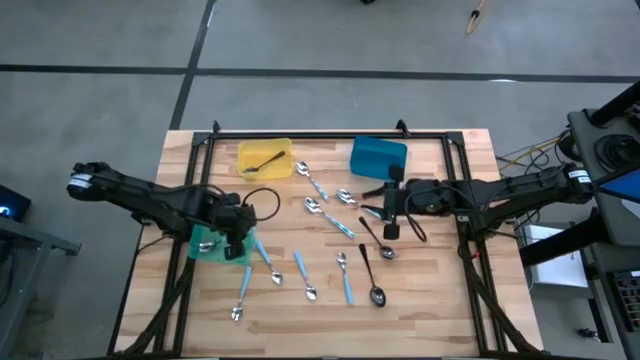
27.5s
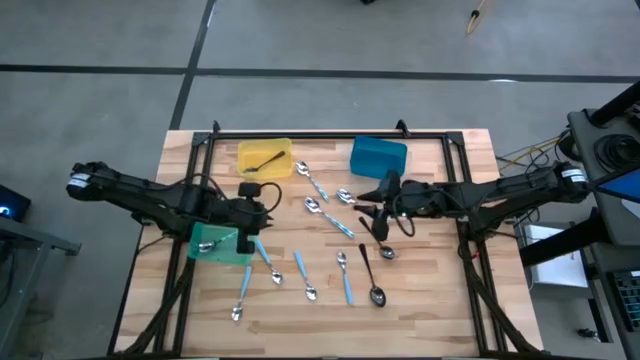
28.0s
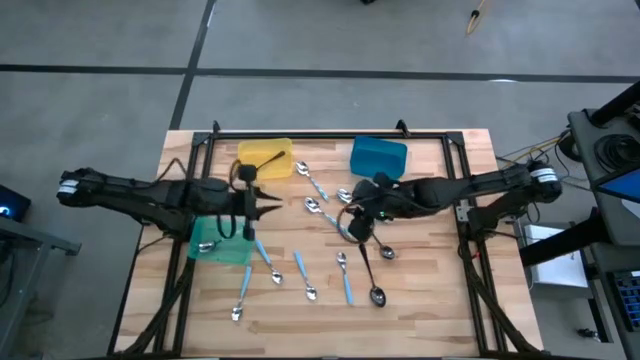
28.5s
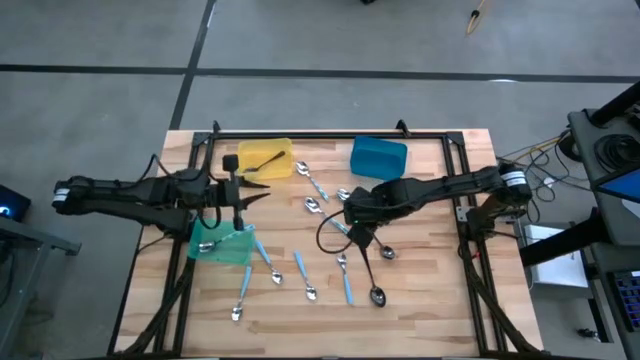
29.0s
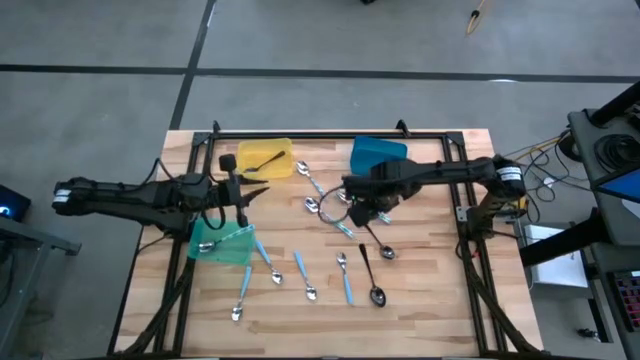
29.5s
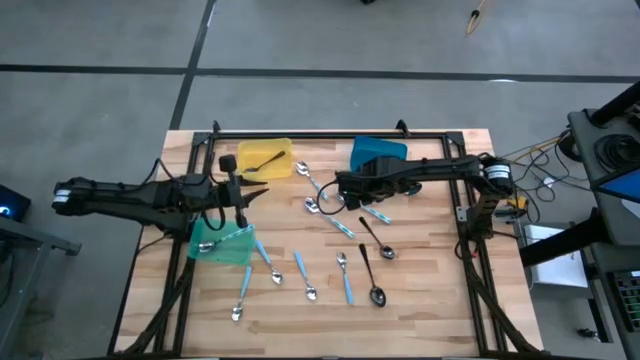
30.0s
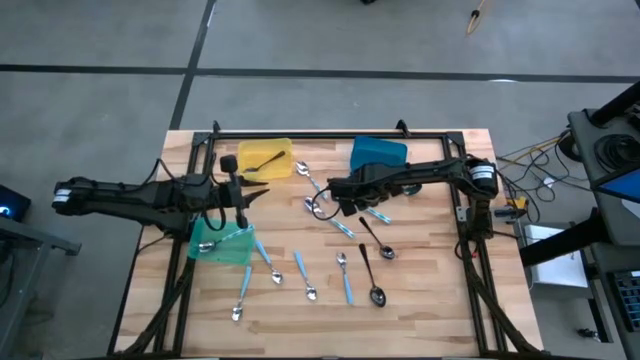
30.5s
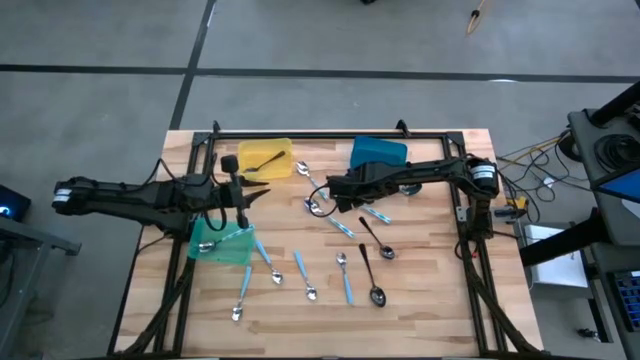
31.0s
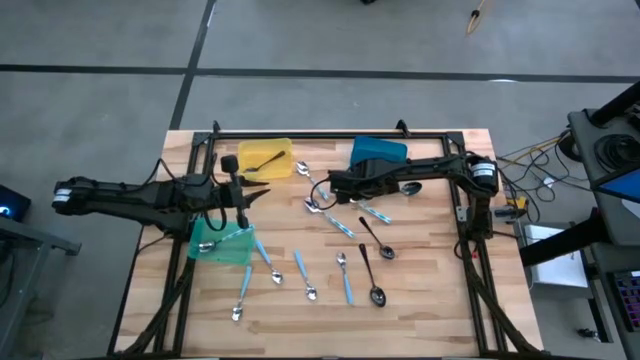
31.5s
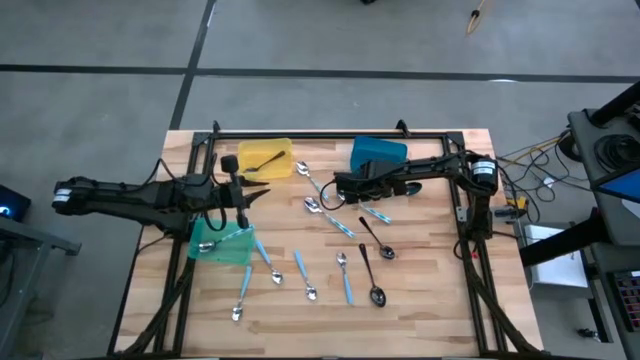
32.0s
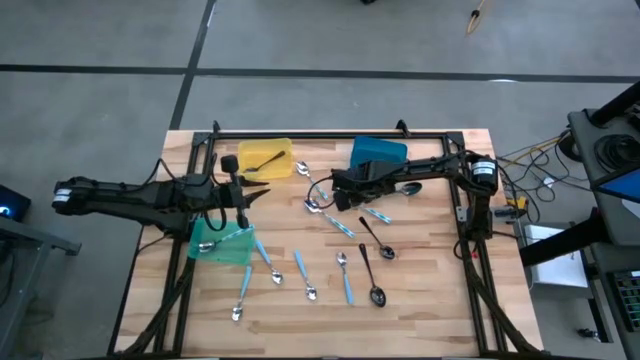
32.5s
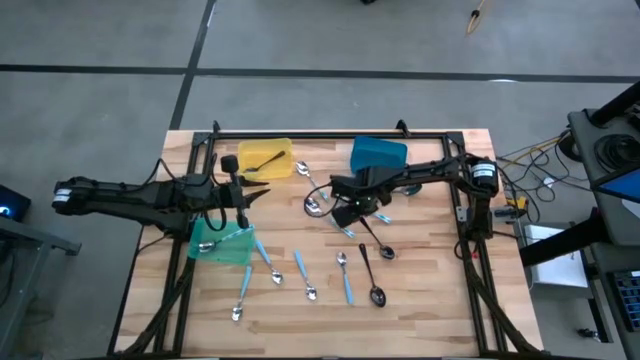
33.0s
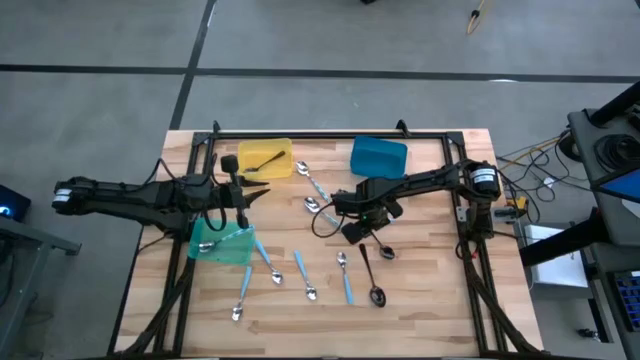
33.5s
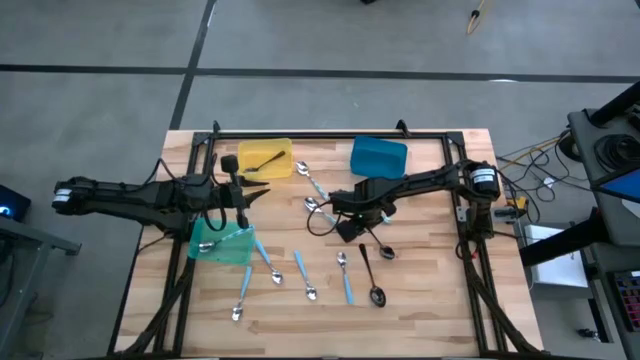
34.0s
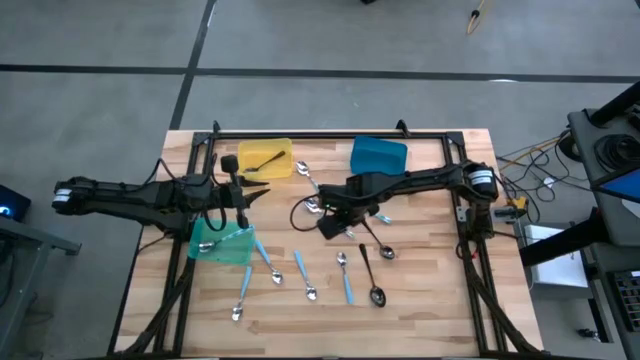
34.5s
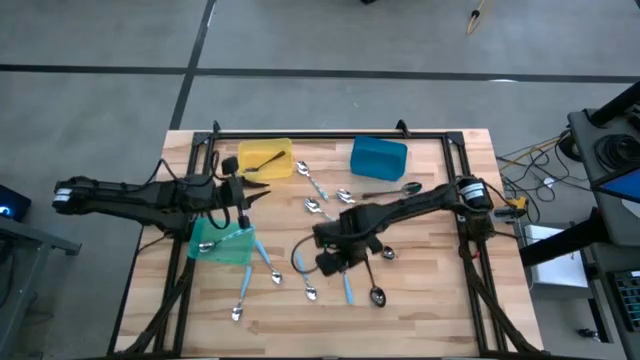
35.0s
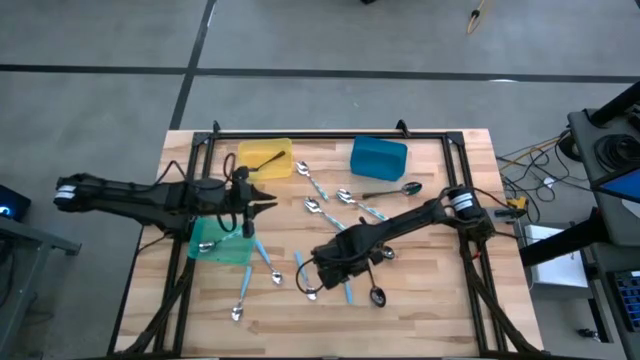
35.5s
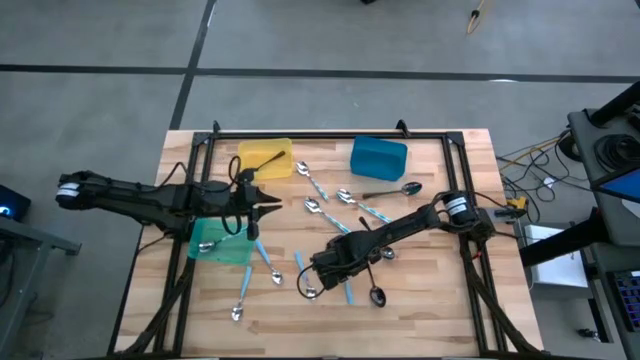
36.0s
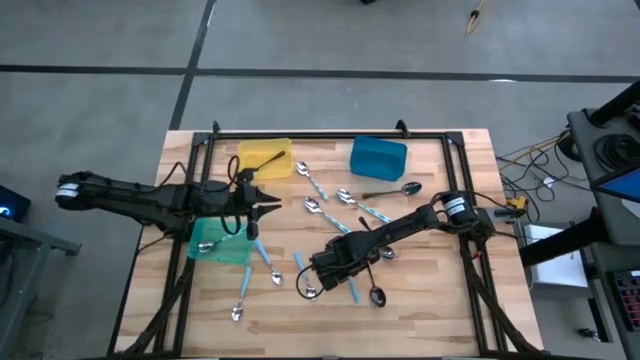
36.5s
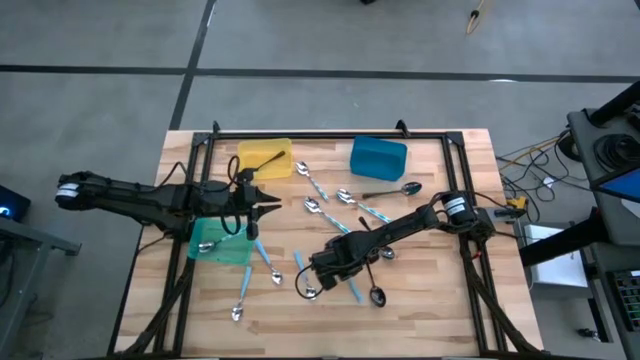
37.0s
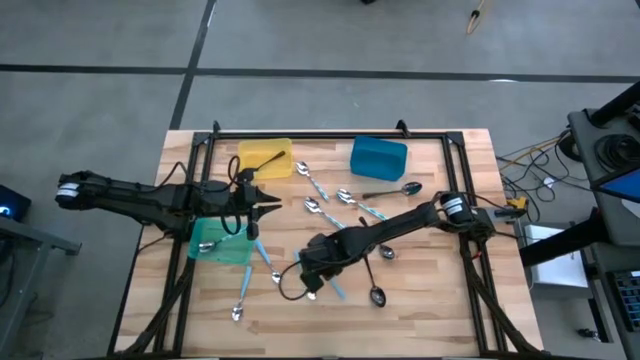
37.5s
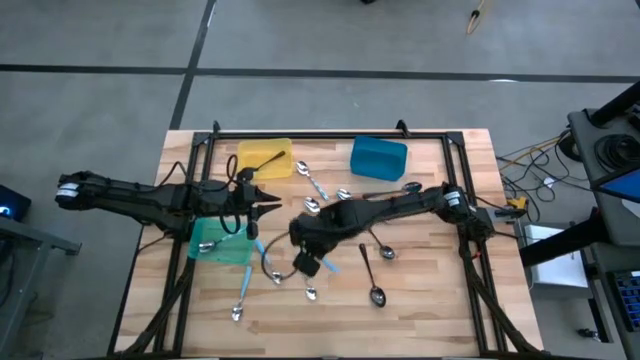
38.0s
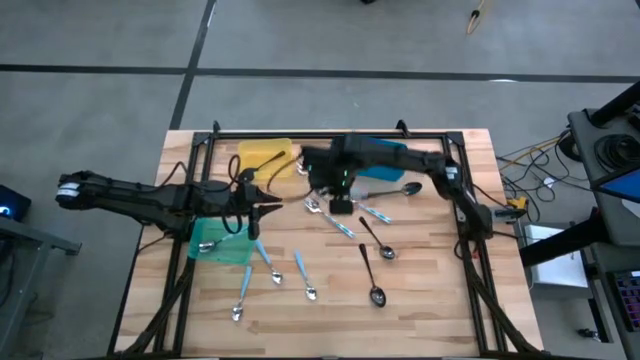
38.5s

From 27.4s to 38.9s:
Task: Sort silverware by color (type)
Put the blue spoon into the blue bin

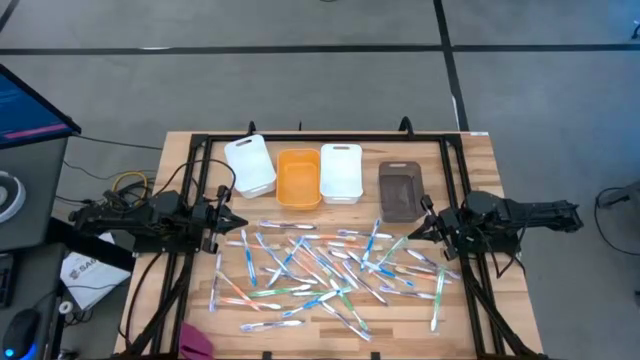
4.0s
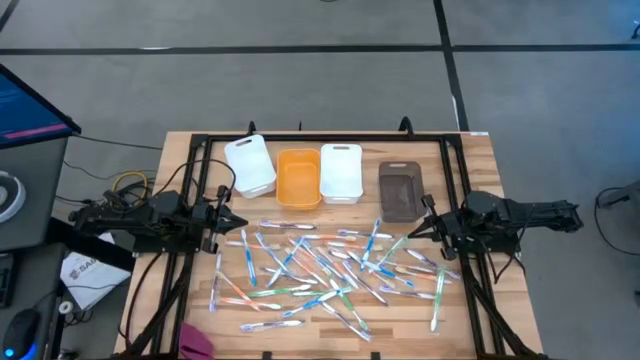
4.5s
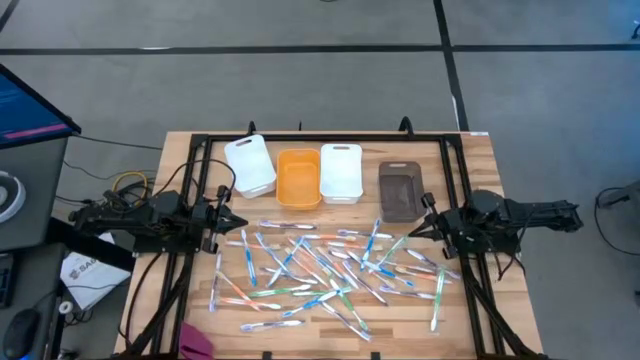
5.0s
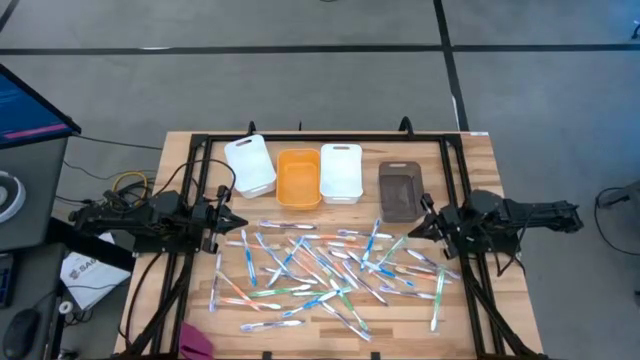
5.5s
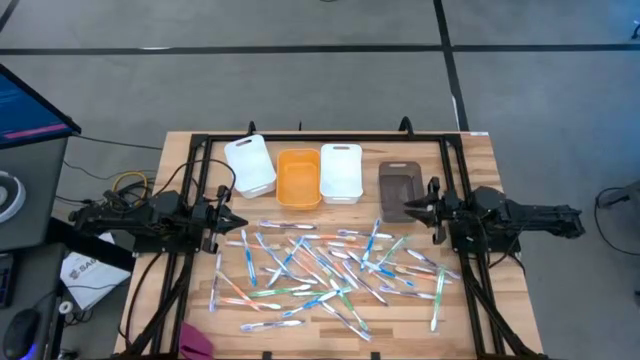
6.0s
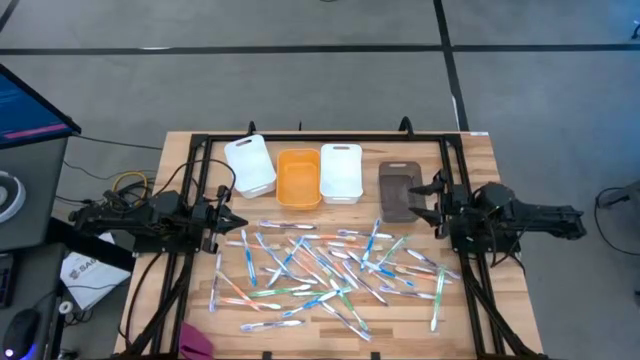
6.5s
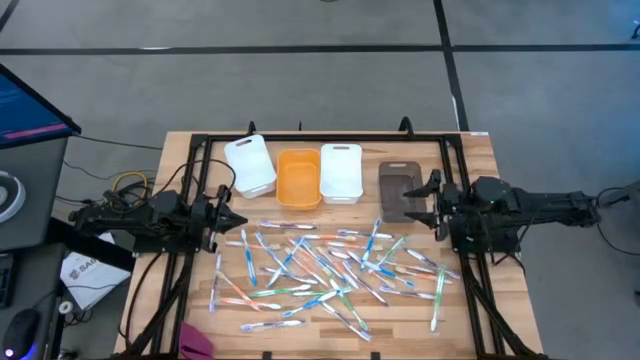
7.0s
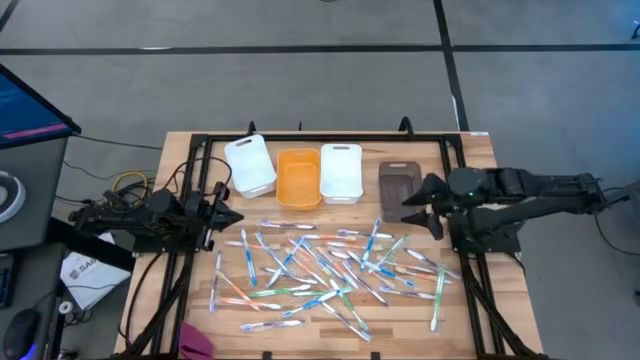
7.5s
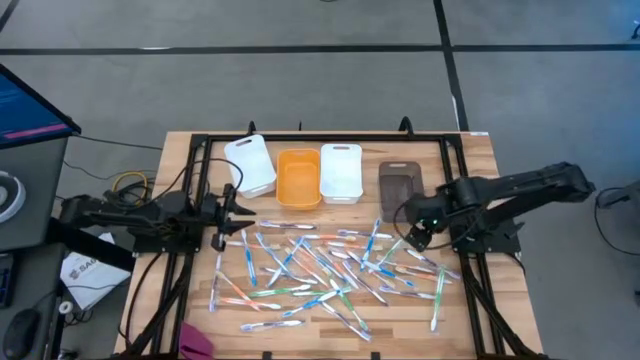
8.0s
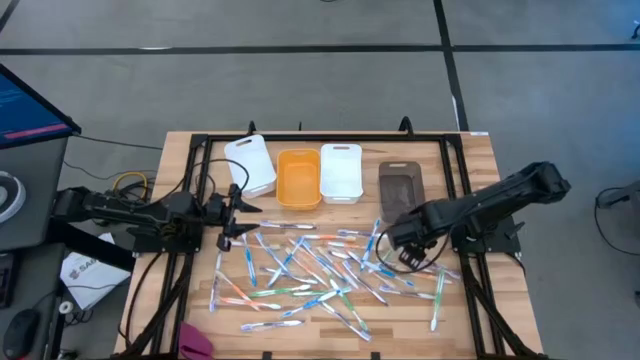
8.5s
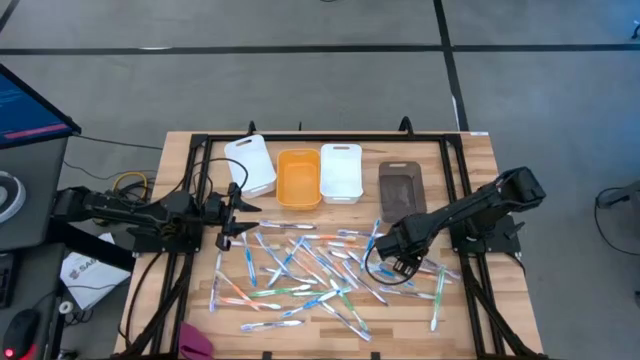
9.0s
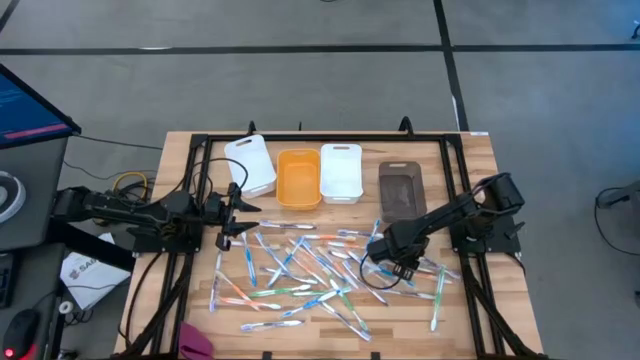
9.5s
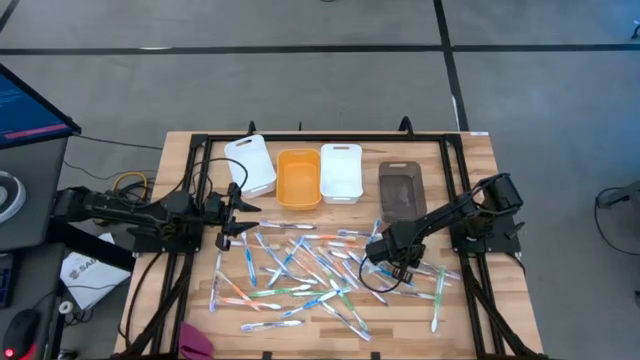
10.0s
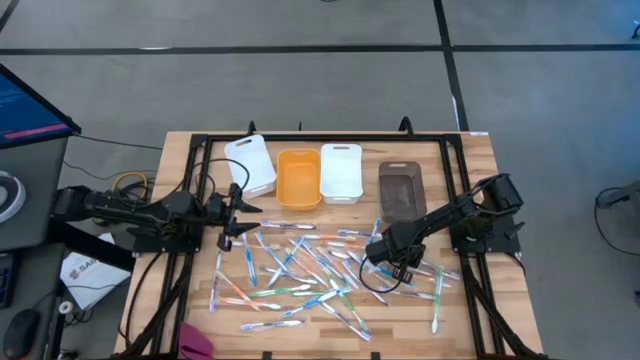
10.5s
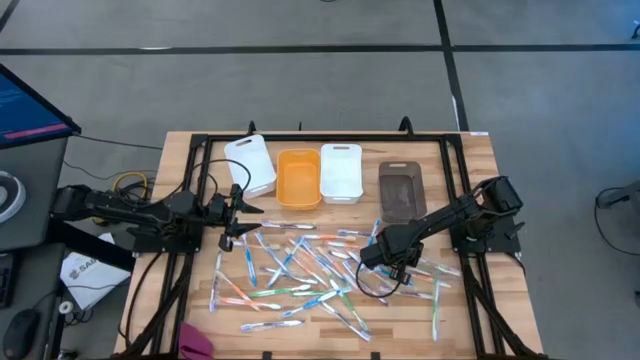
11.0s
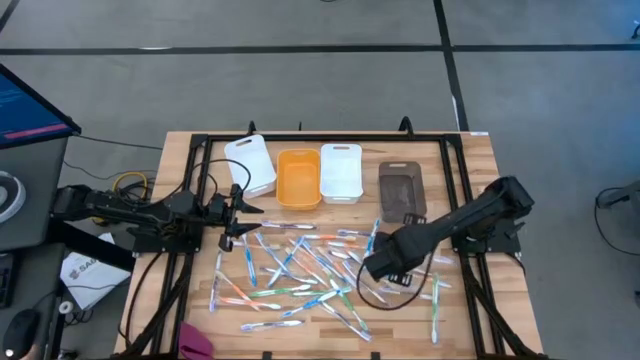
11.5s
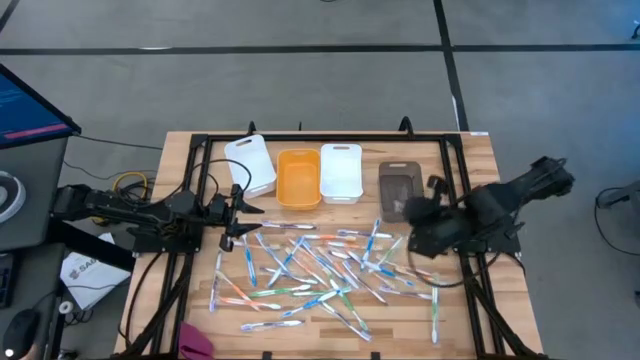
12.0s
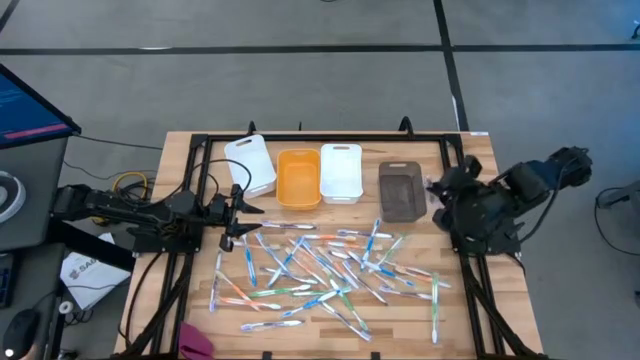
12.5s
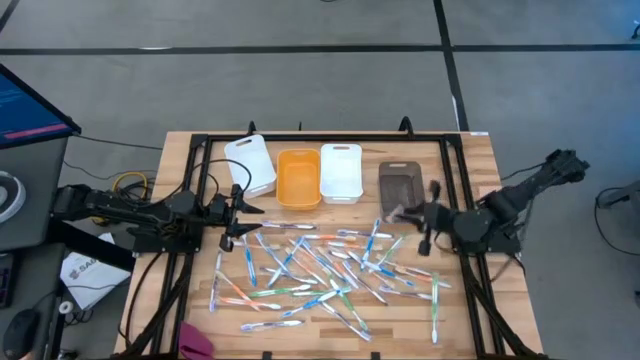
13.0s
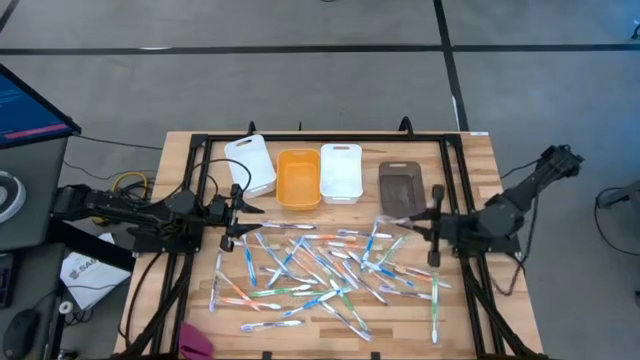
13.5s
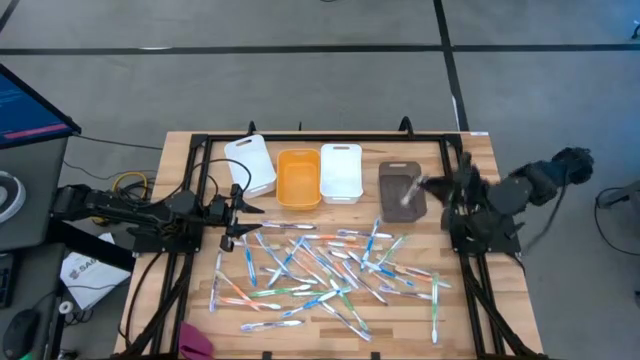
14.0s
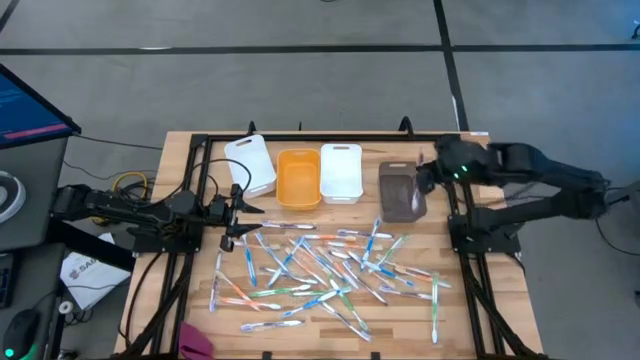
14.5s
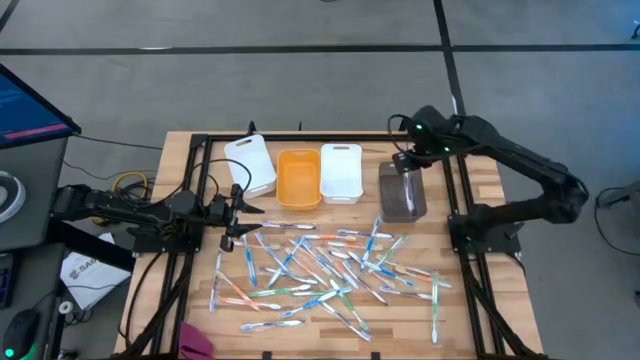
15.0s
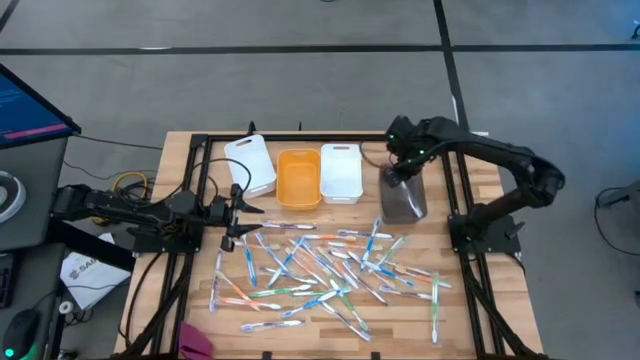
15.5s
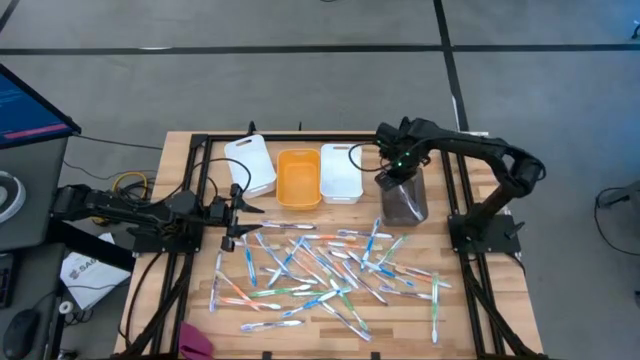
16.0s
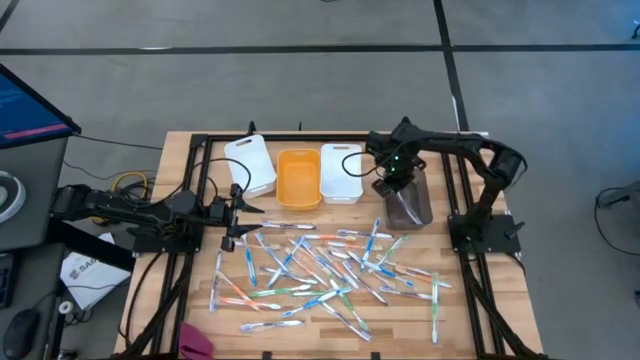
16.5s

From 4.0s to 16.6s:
Task: Pick & Place Toothbrushes
Put the white violet toothbrush into the black transparent bin
